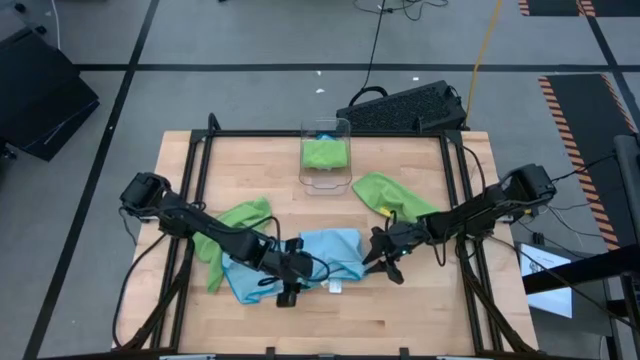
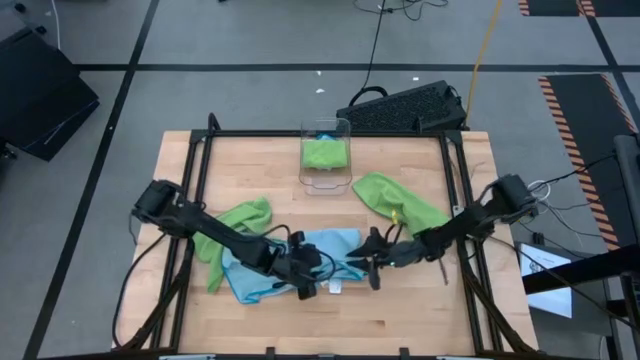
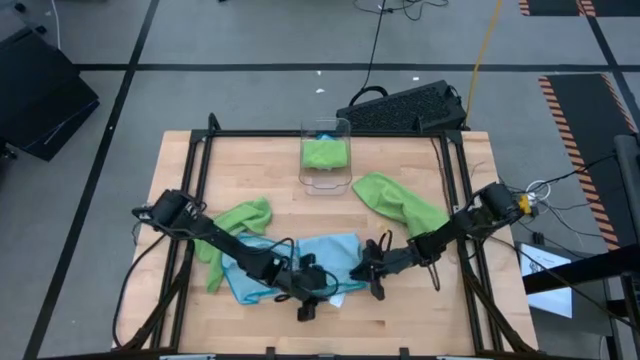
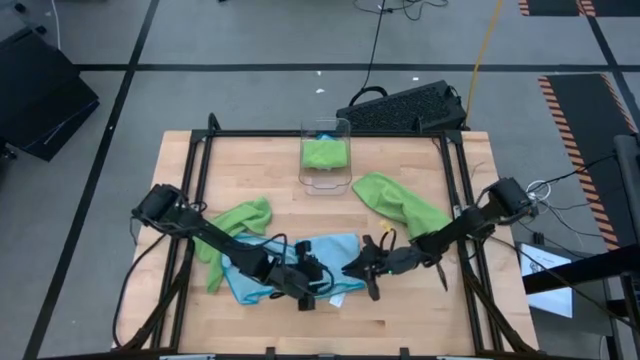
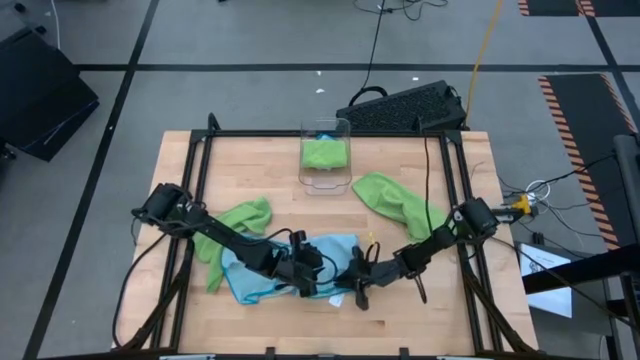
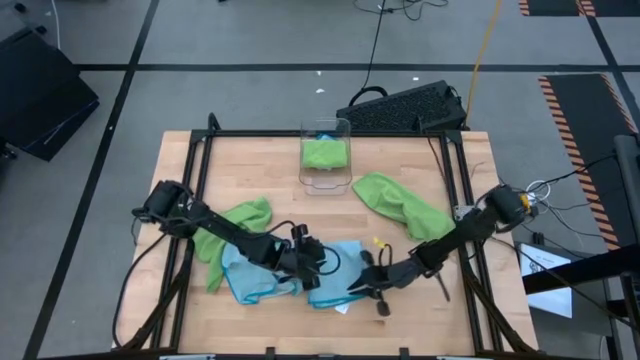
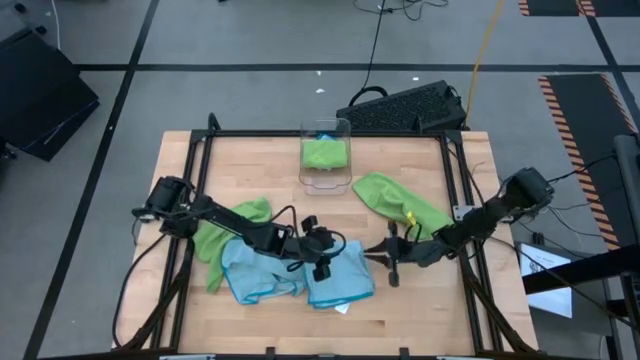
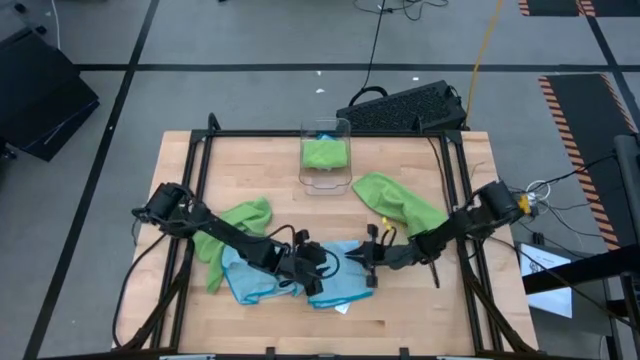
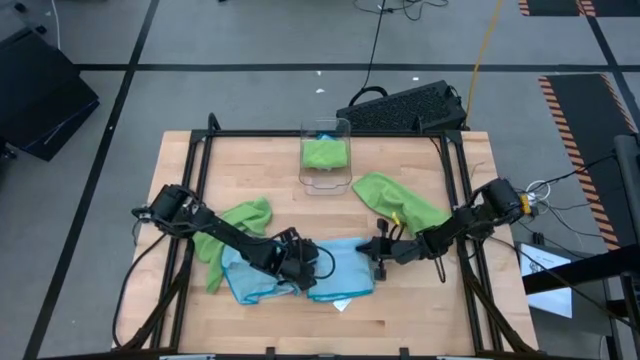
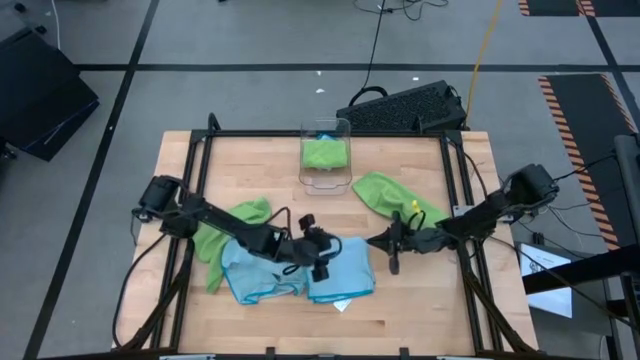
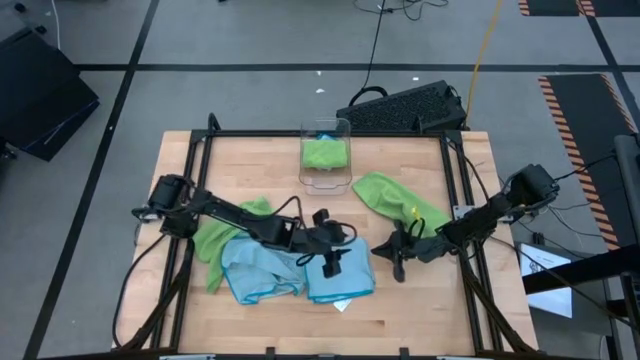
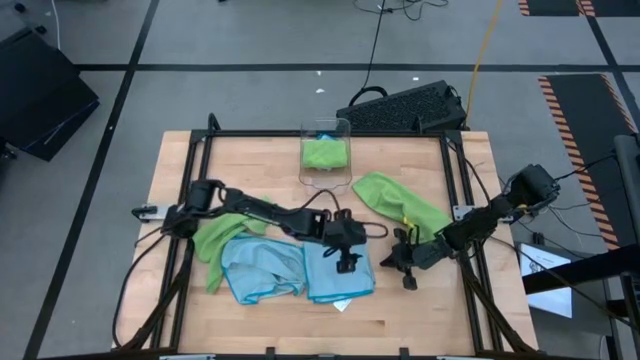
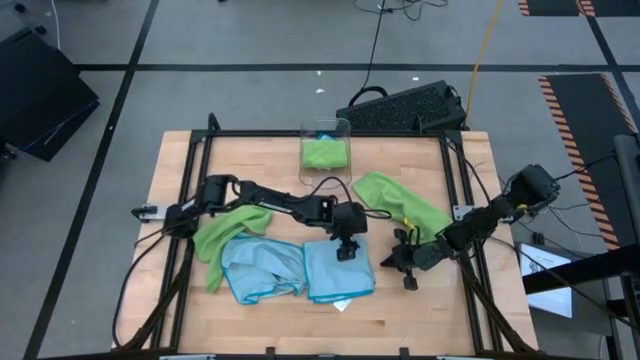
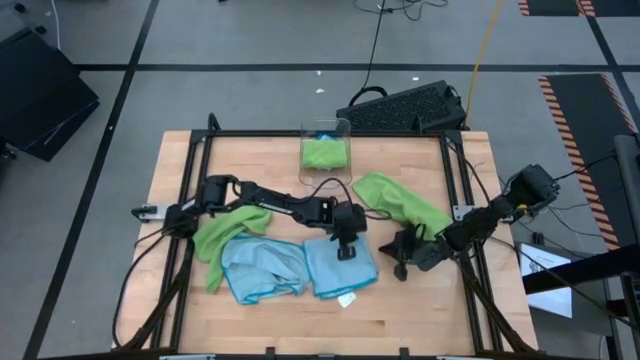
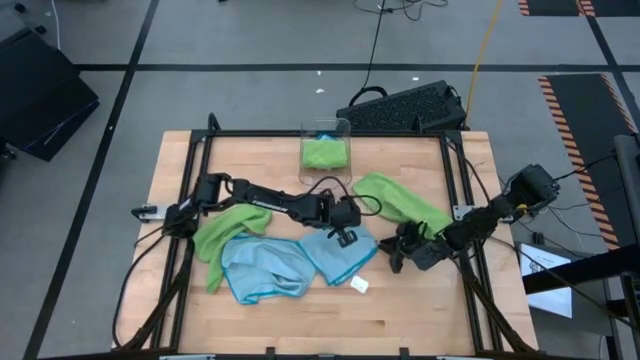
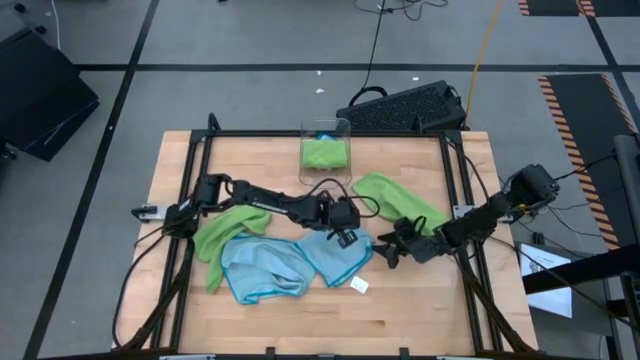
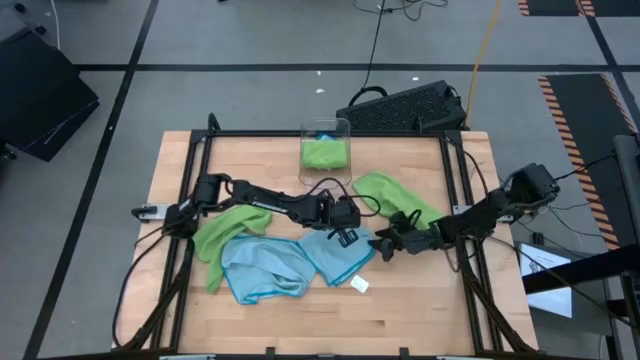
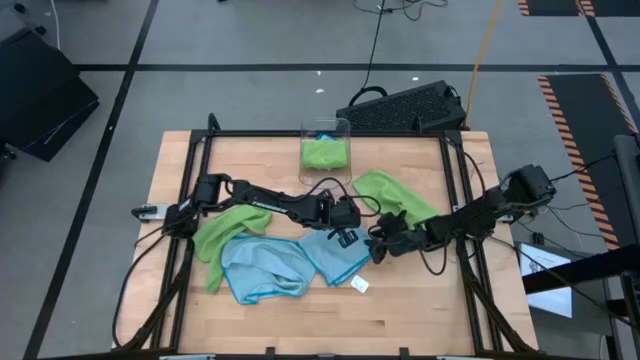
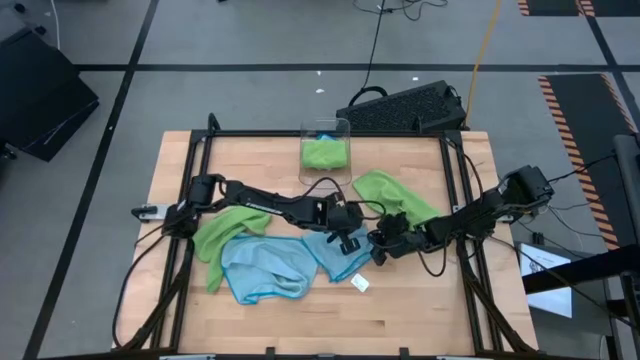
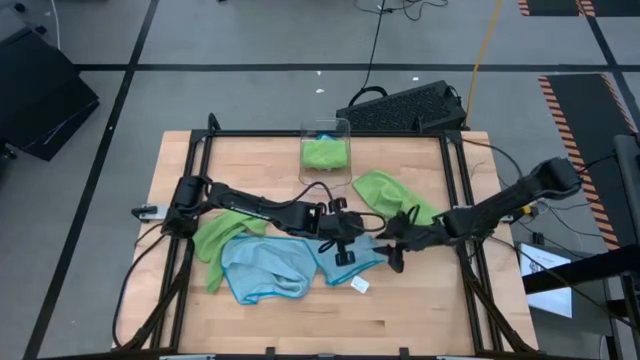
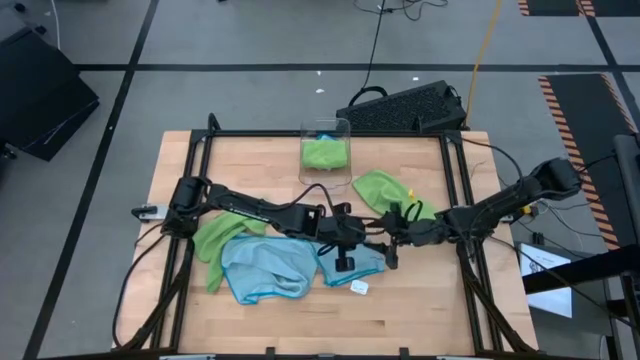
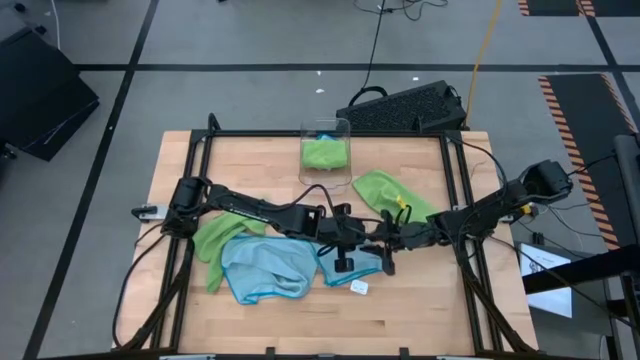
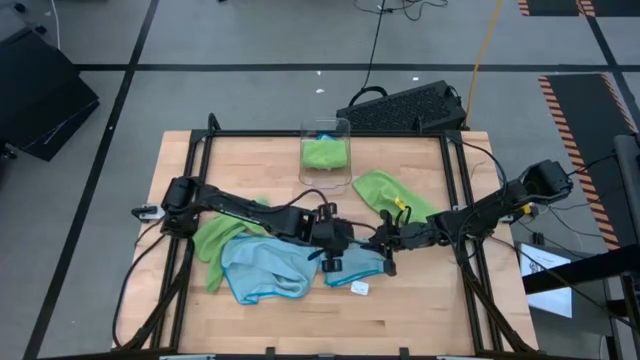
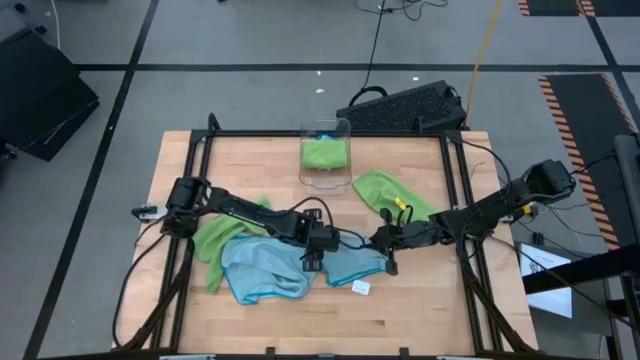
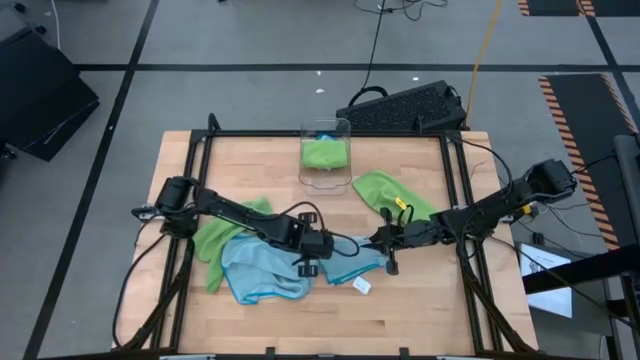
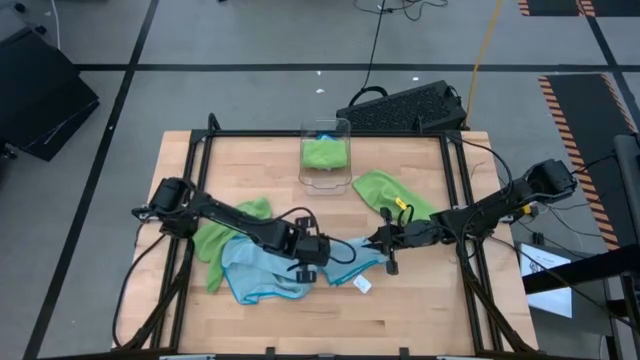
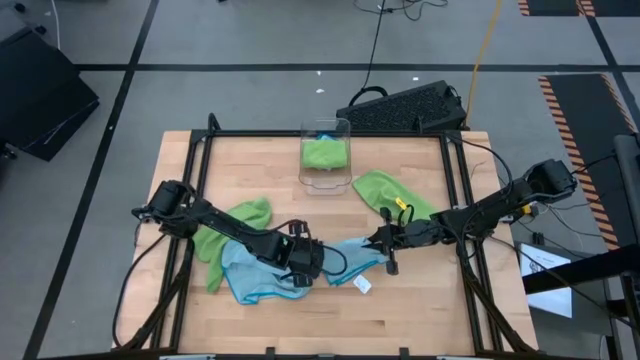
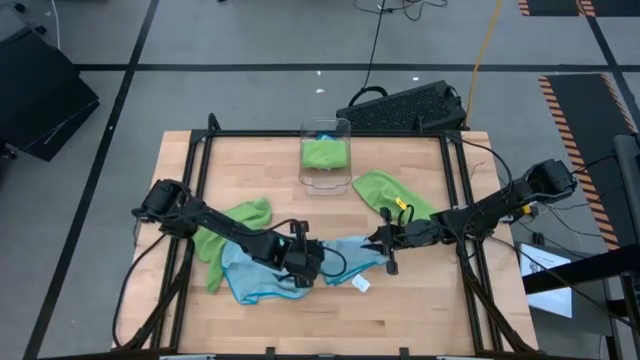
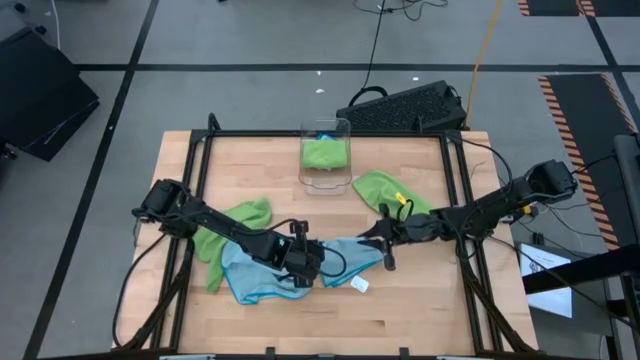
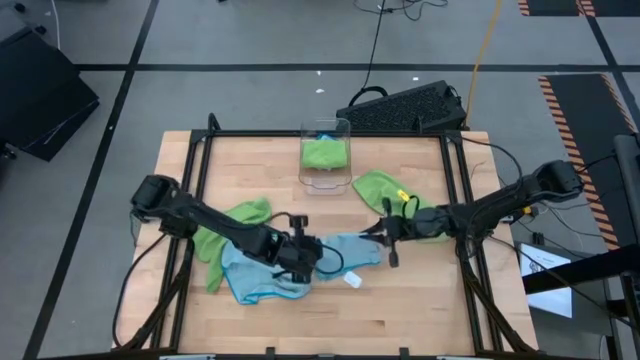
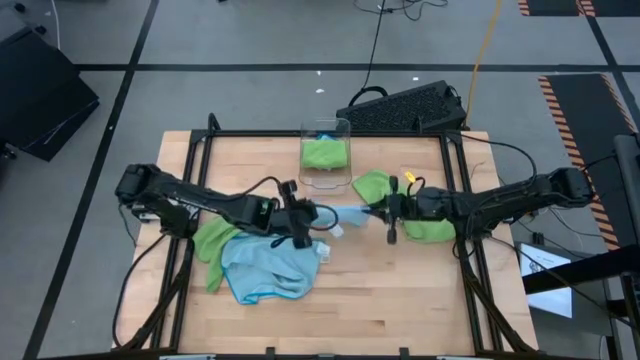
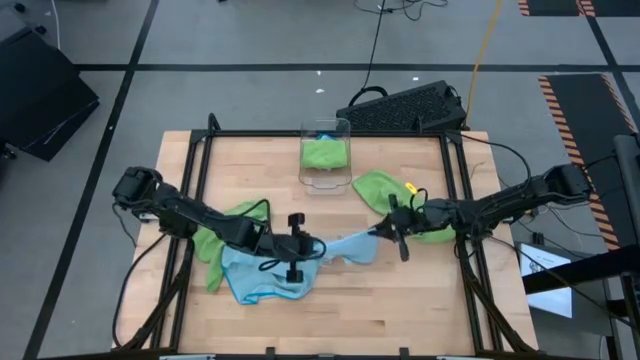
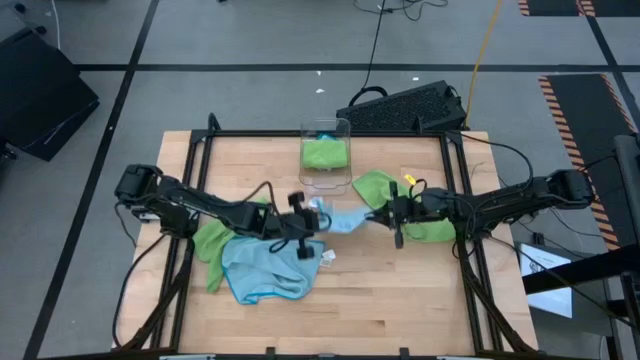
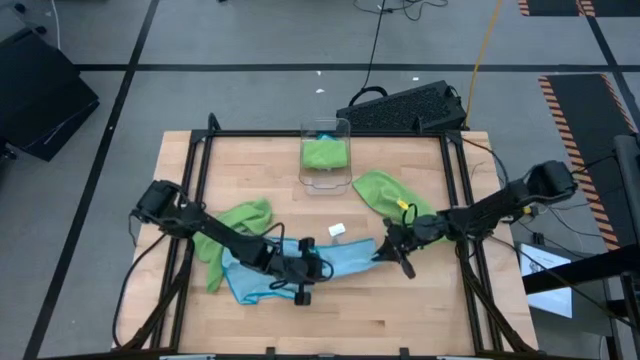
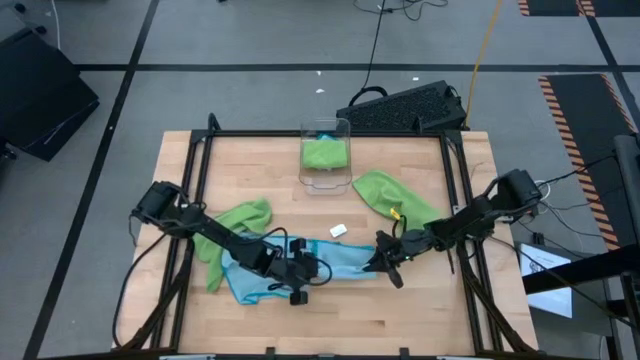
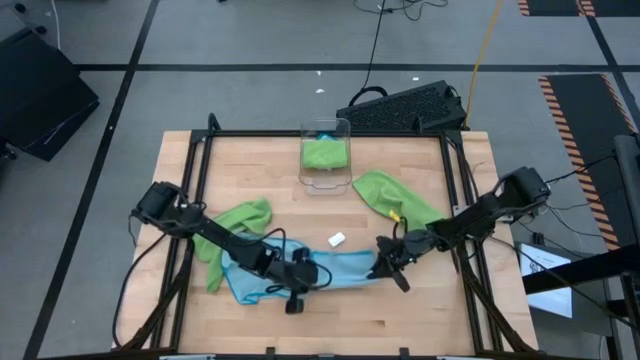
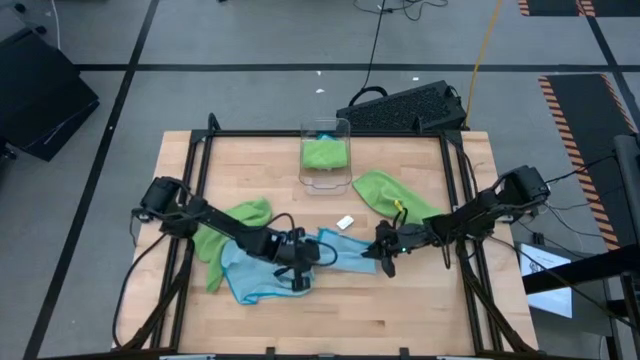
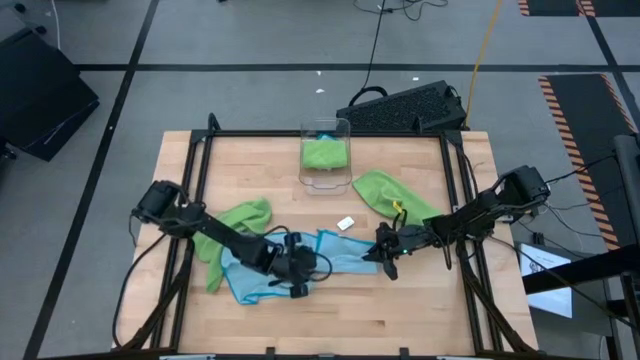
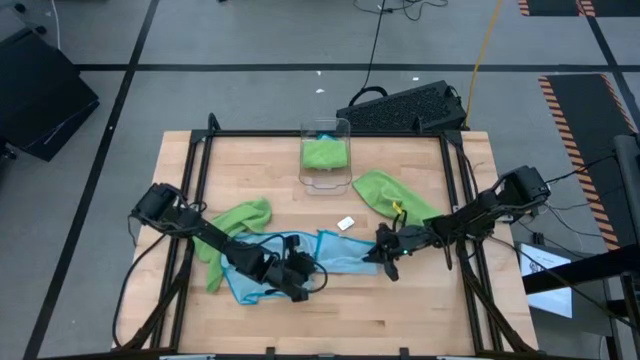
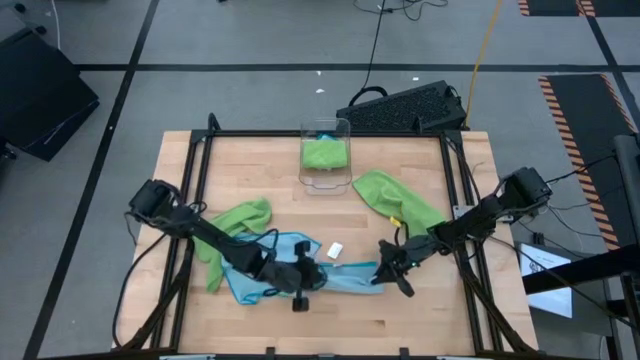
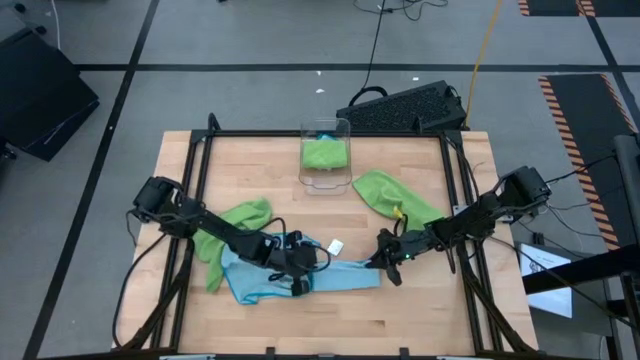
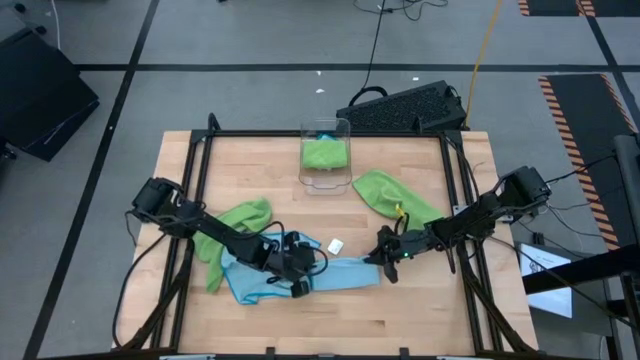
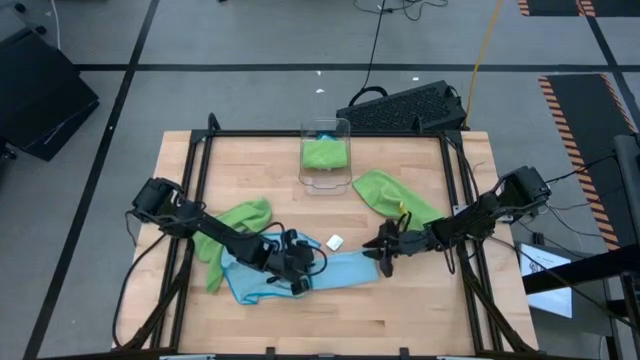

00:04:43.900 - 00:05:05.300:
Task: Fold microfiber towels
Fold the right blue towel
